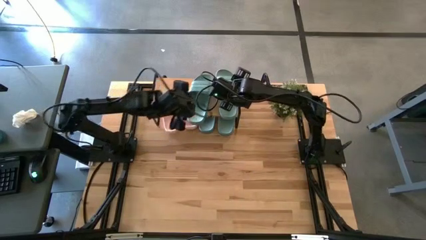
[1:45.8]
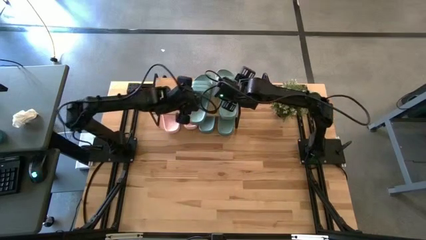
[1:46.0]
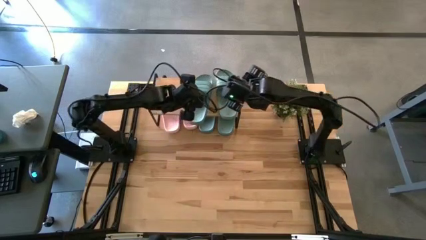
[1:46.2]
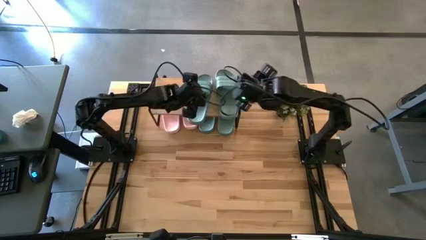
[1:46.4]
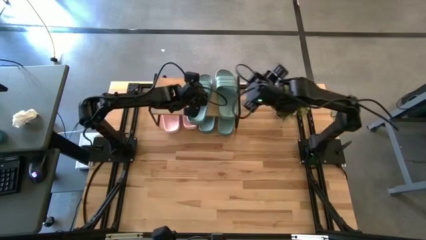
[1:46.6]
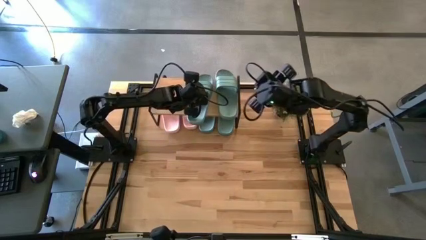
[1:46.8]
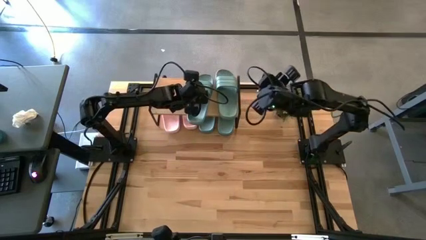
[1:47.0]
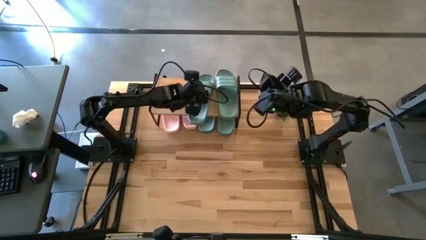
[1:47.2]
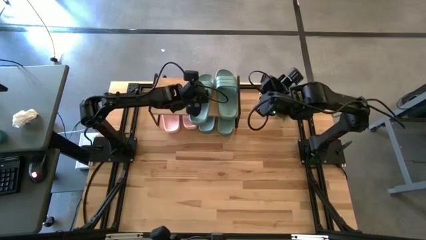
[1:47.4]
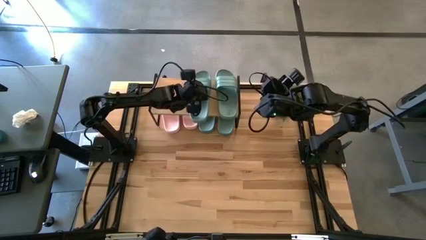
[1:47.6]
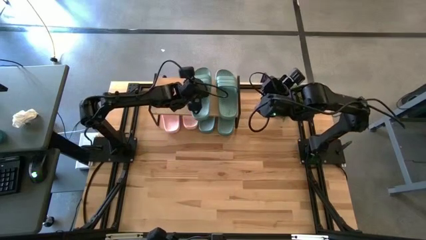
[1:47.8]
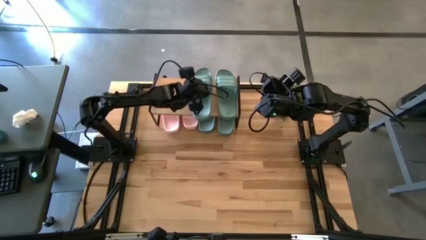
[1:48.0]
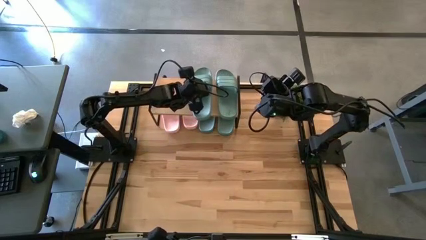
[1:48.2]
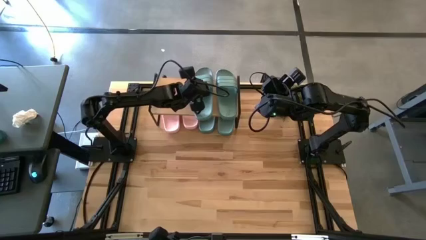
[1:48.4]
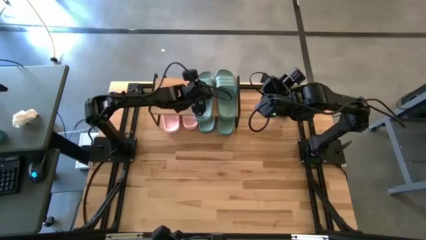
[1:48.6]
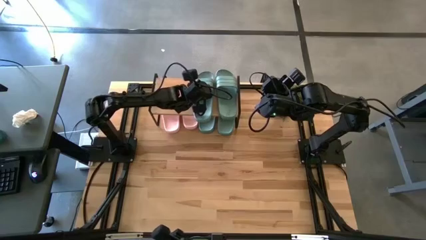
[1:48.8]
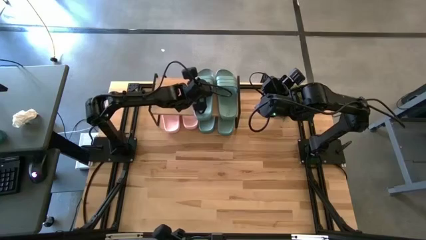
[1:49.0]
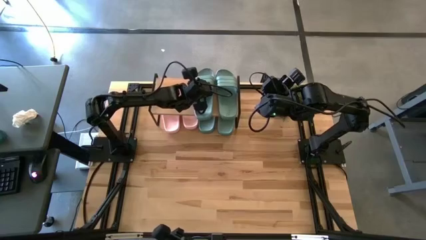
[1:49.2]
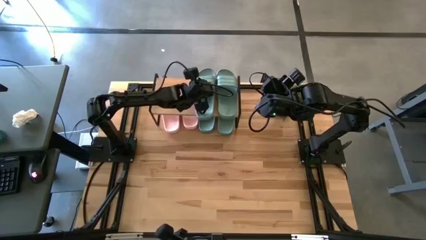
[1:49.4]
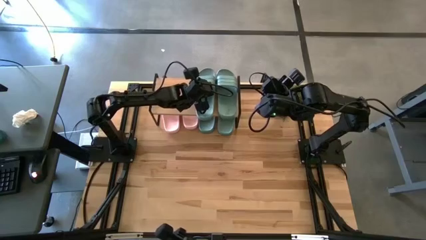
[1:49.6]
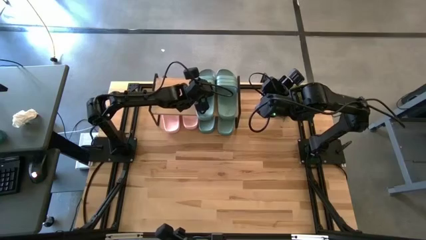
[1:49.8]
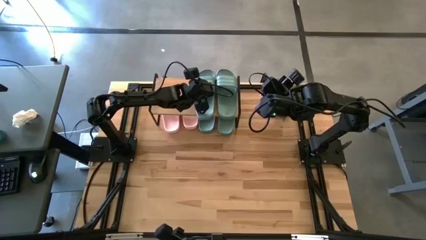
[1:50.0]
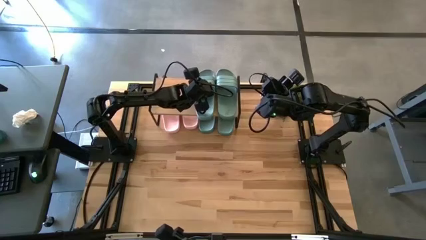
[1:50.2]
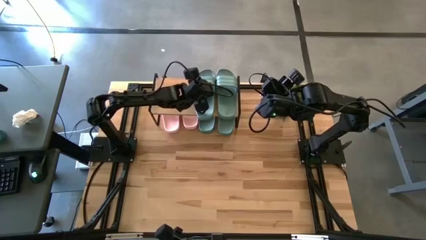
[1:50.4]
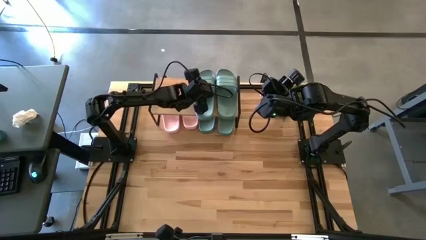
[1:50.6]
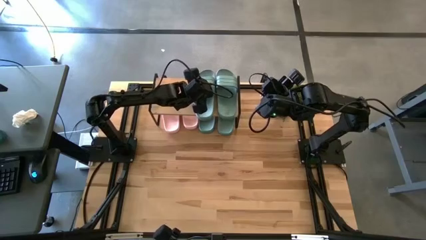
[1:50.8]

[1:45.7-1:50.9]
Task: Pick and place slides into the shelf
Adjust the left blue slipper on the top shelf

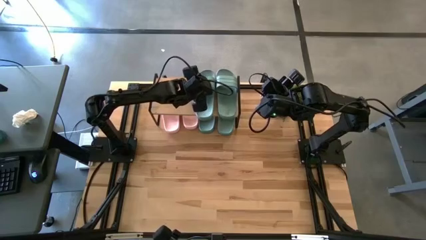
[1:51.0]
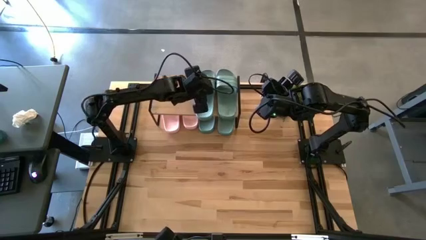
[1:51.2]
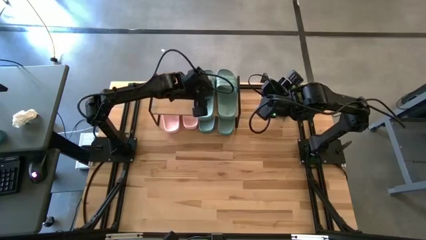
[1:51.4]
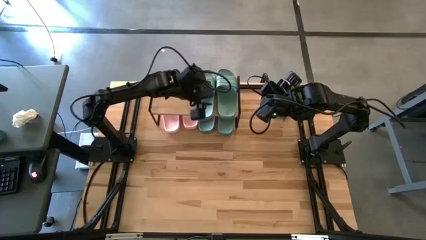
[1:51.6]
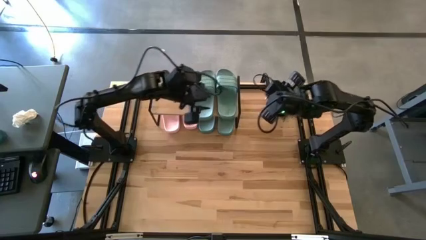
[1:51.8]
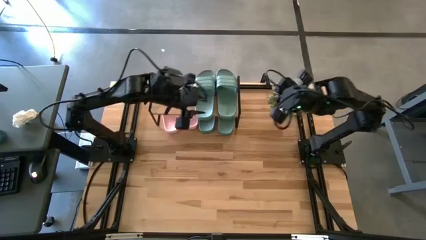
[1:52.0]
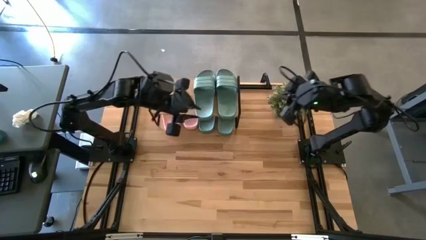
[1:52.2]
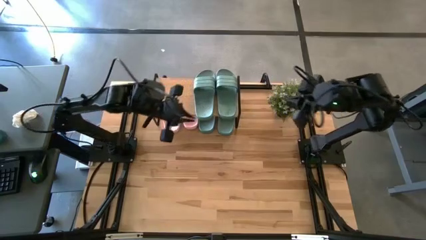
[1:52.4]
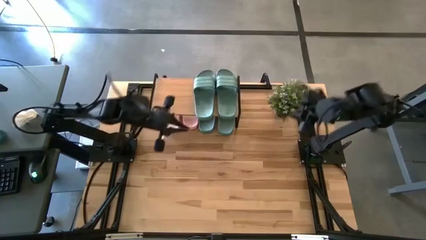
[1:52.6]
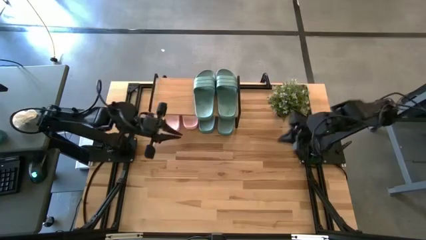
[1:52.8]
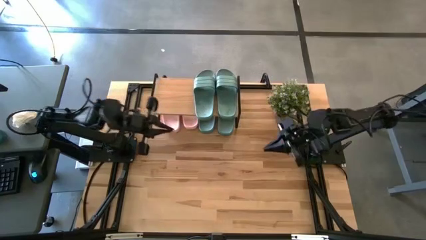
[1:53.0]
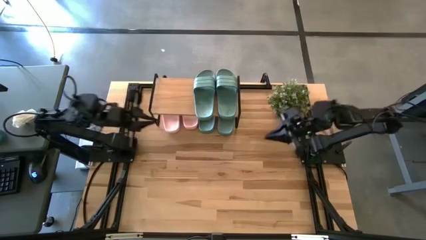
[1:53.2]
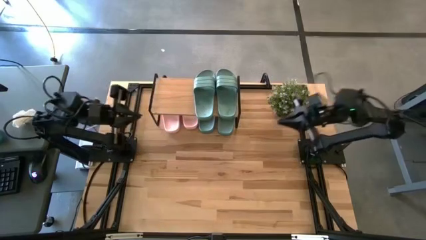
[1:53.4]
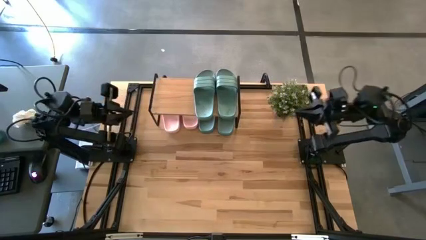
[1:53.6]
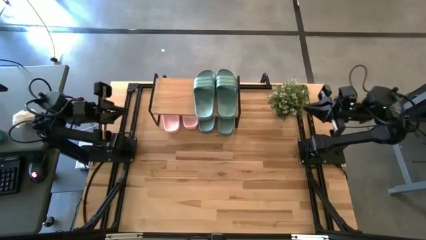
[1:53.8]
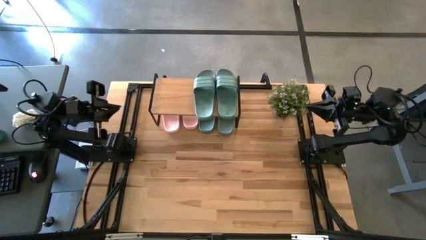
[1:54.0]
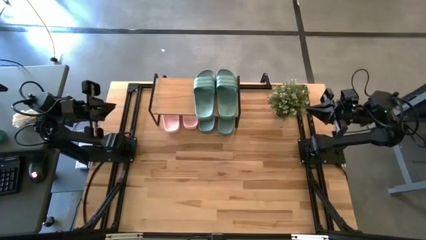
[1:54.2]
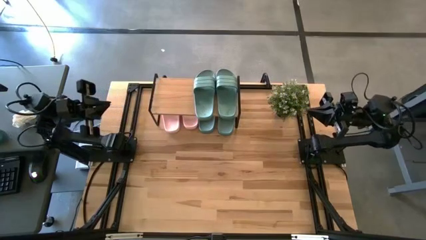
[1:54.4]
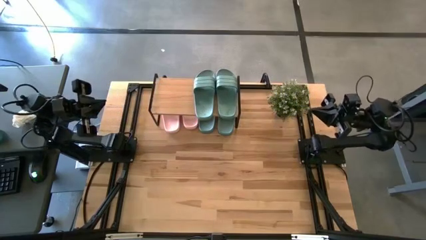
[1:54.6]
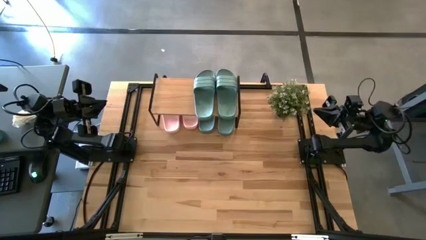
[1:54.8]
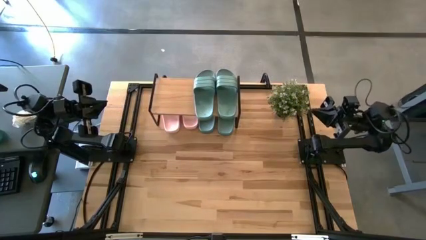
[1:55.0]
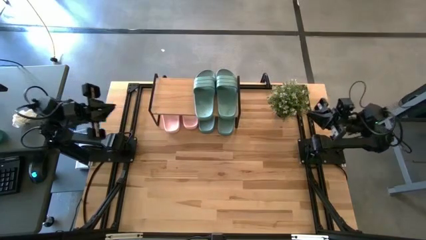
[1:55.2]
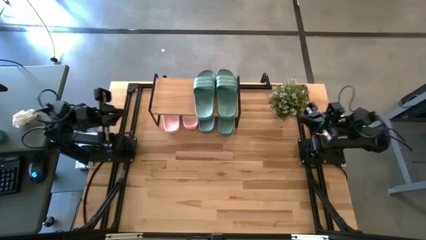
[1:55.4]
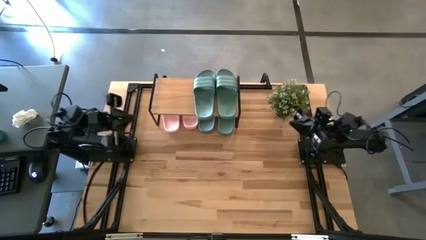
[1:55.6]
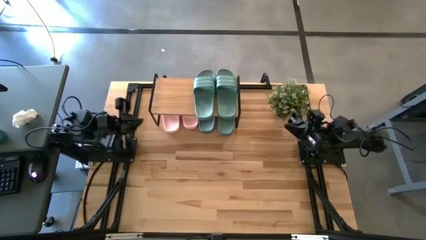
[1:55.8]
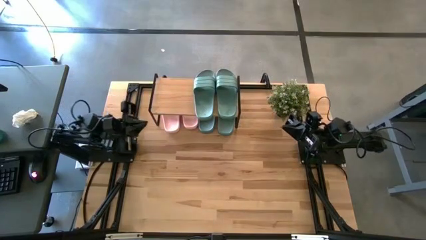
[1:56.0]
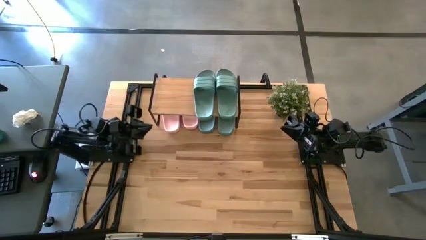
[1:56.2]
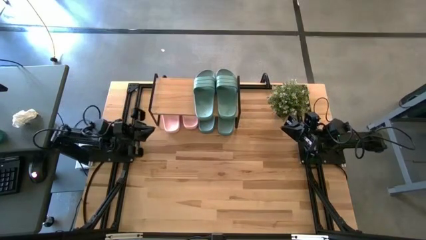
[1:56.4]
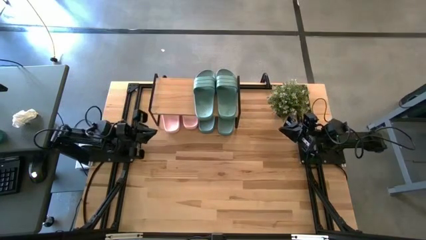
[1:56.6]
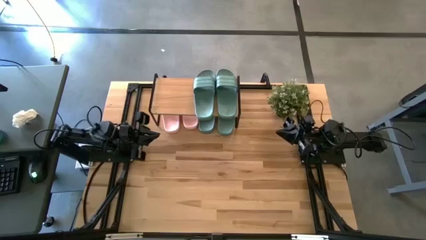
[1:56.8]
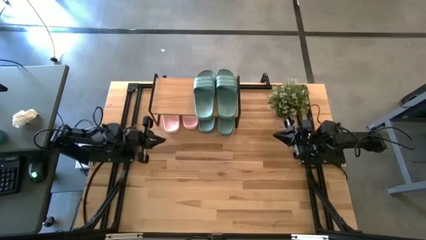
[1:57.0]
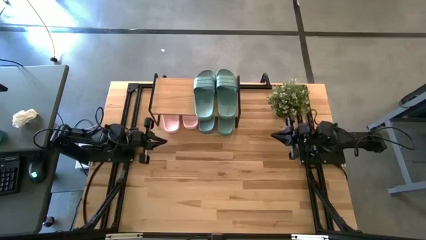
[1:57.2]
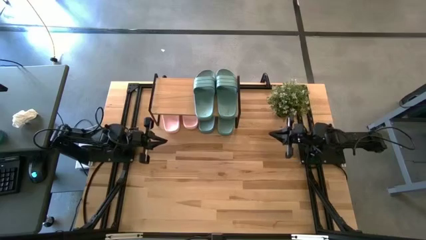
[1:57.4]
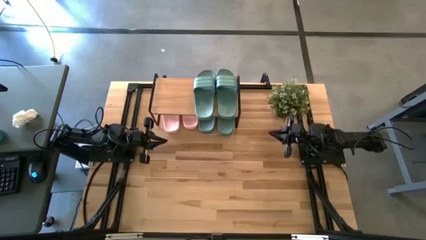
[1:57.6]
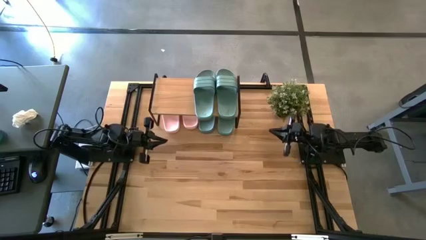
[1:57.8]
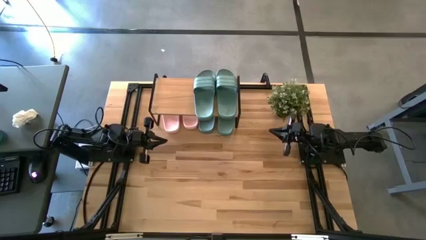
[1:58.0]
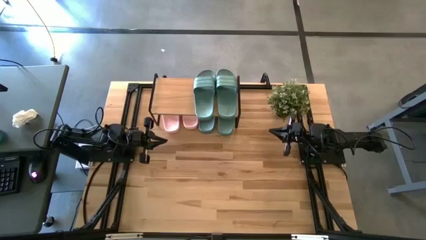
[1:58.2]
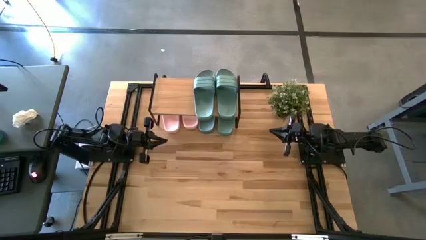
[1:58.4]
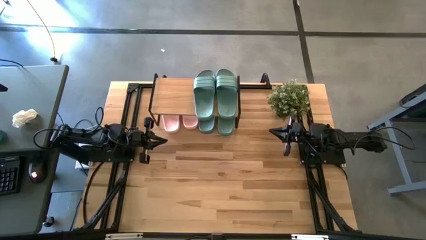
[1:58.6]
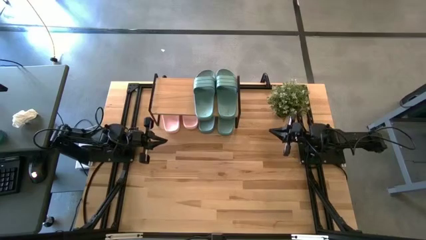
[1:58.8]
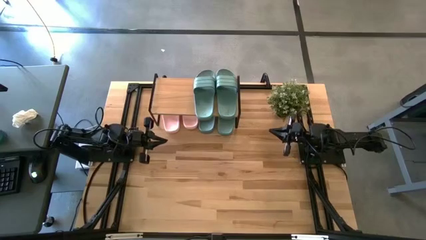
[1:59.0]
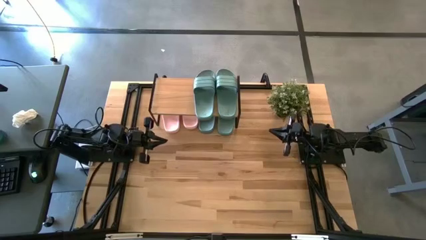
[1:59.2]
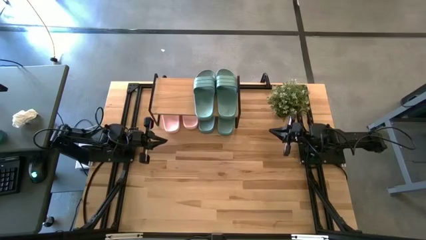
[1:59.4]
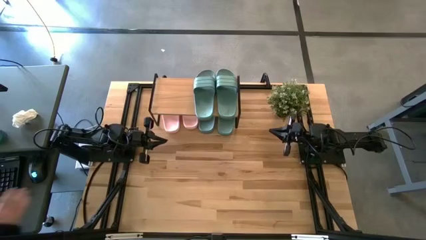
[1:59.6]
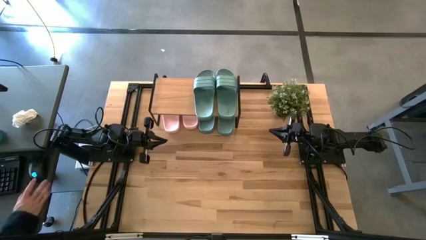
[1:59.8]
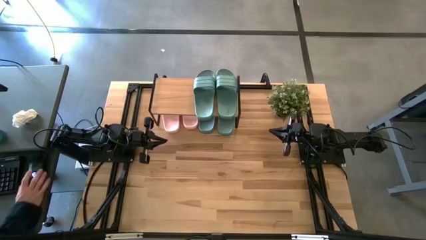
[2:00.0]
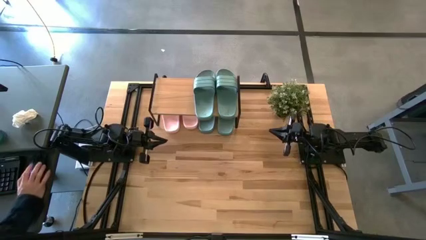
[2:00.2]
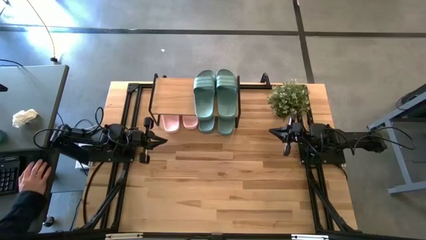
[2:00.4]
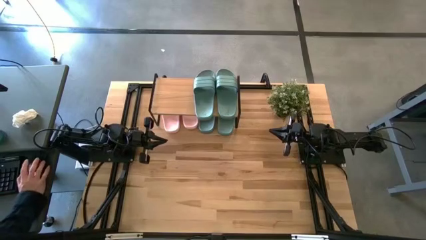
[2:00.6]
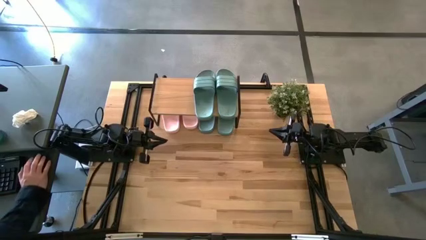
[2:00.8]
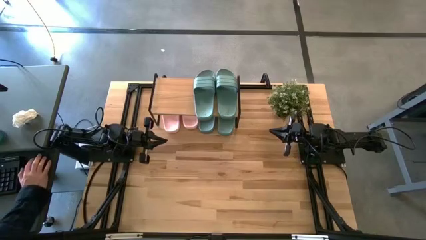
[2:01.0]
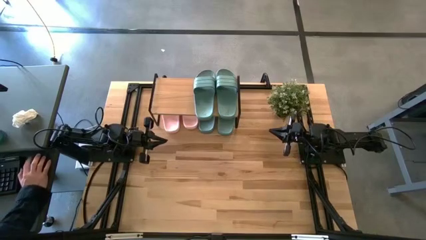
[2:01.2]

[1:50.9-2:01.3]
Return to Home Position
